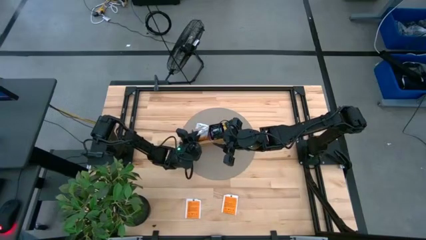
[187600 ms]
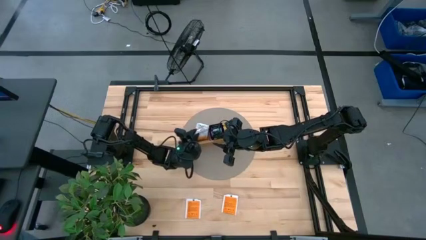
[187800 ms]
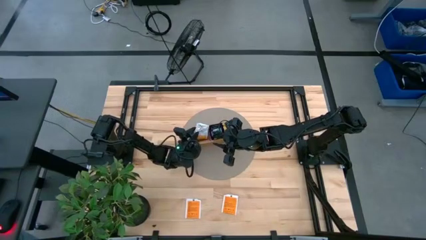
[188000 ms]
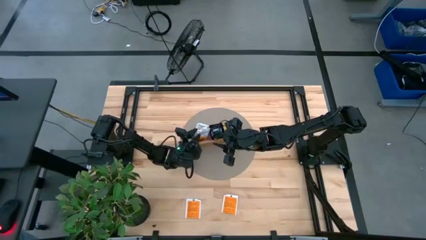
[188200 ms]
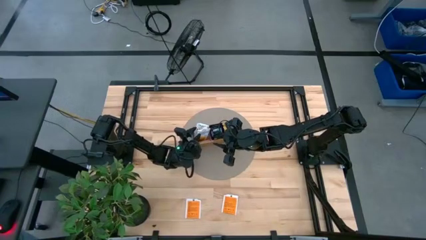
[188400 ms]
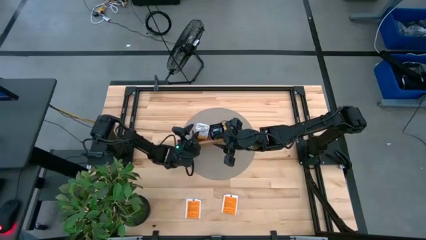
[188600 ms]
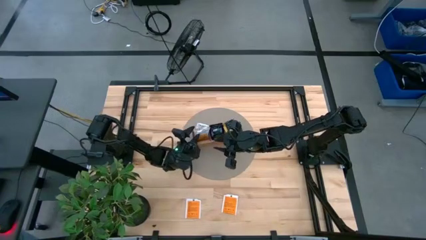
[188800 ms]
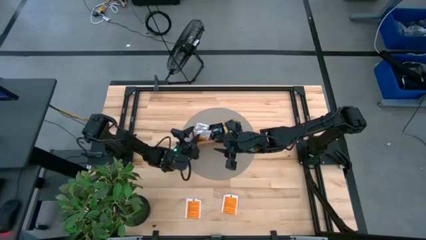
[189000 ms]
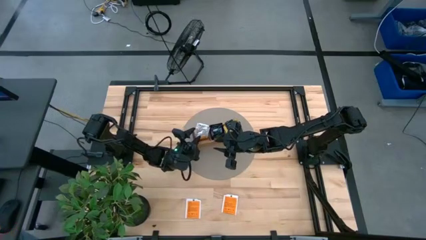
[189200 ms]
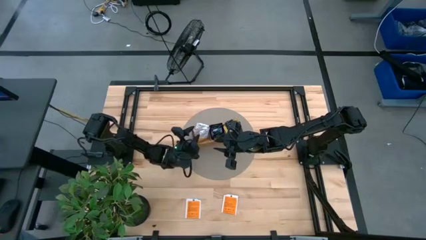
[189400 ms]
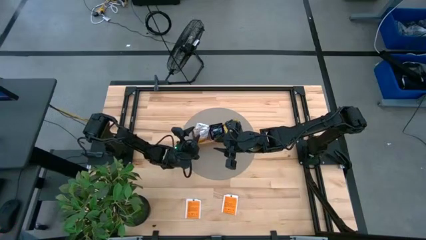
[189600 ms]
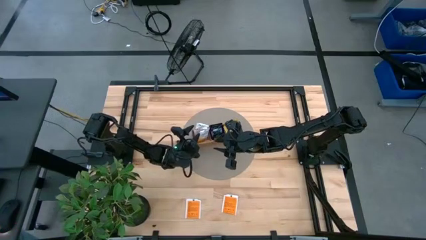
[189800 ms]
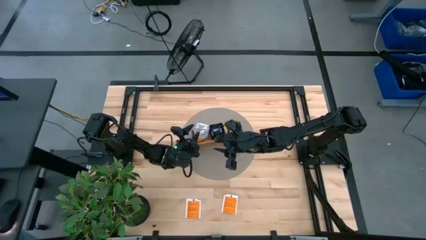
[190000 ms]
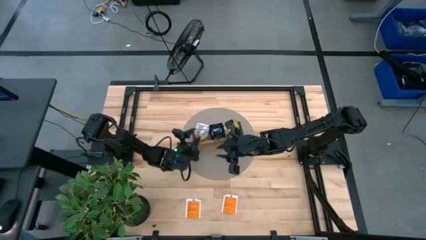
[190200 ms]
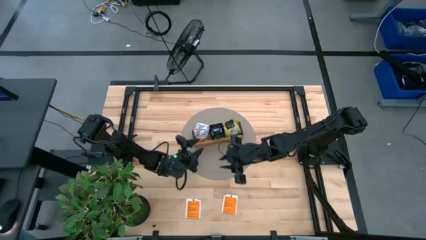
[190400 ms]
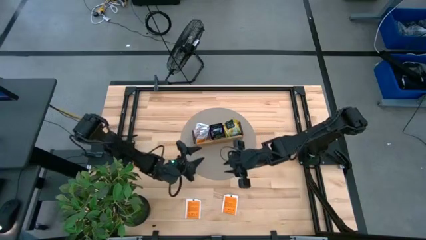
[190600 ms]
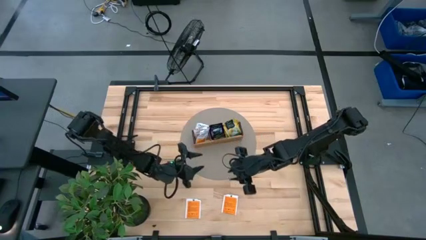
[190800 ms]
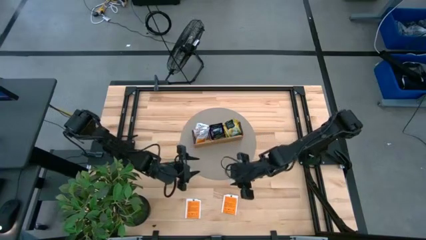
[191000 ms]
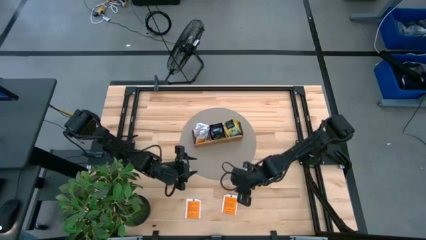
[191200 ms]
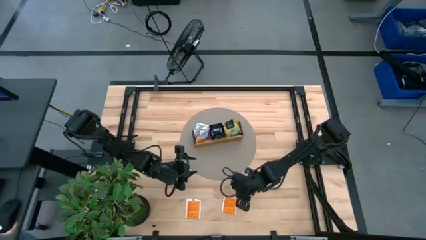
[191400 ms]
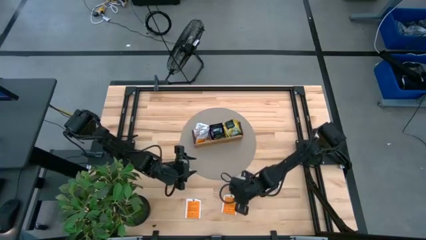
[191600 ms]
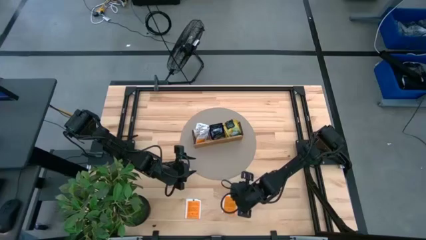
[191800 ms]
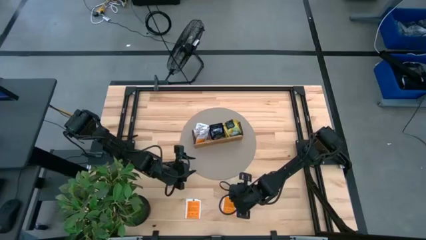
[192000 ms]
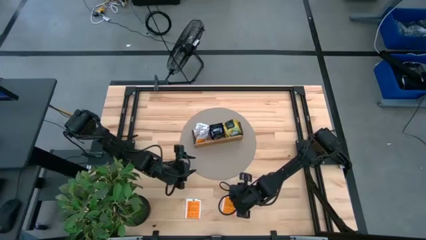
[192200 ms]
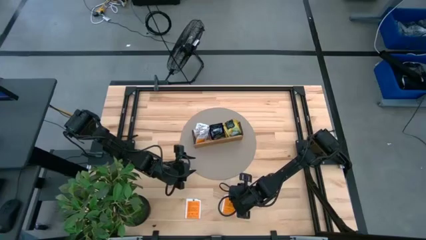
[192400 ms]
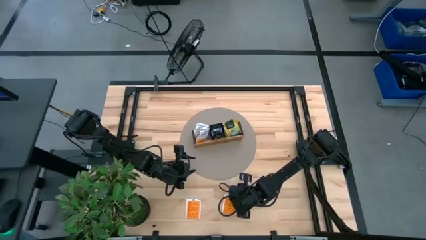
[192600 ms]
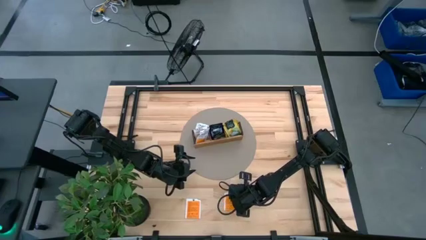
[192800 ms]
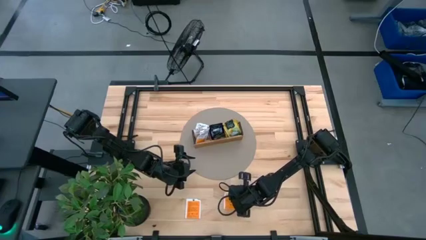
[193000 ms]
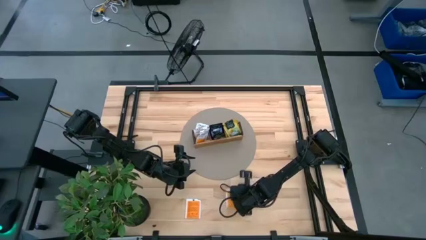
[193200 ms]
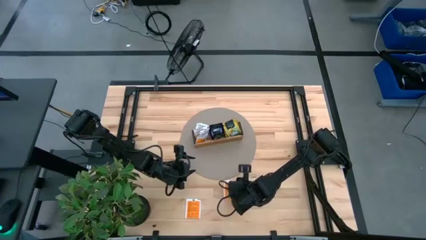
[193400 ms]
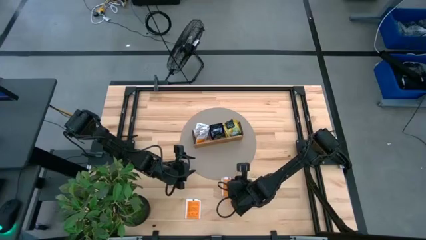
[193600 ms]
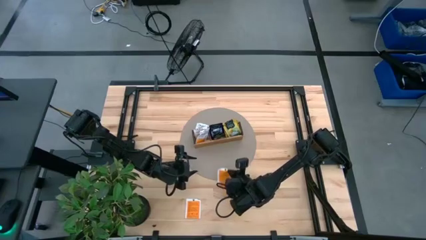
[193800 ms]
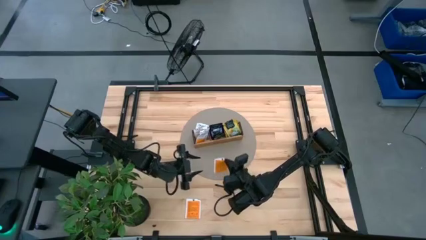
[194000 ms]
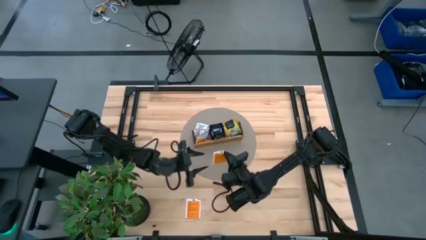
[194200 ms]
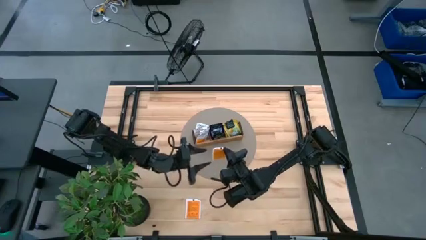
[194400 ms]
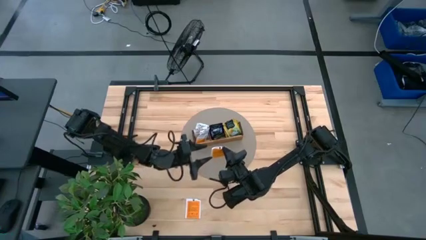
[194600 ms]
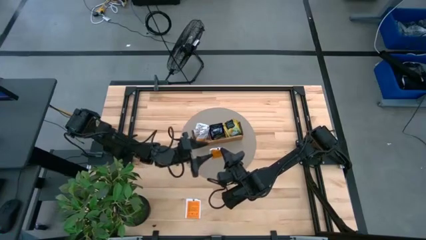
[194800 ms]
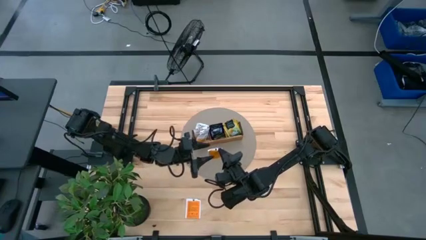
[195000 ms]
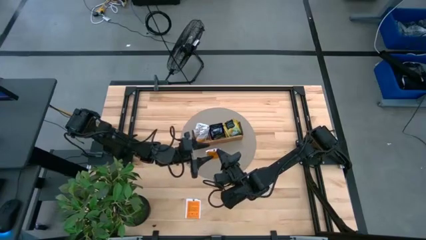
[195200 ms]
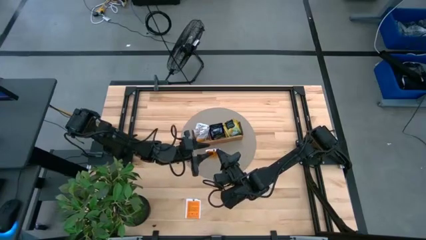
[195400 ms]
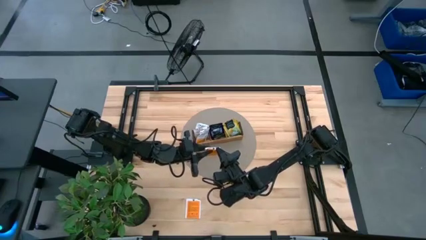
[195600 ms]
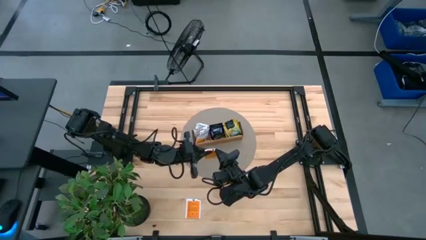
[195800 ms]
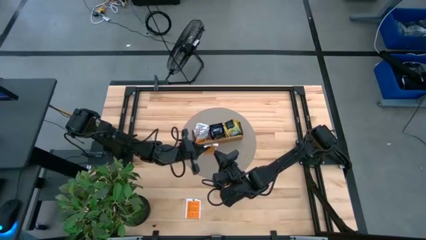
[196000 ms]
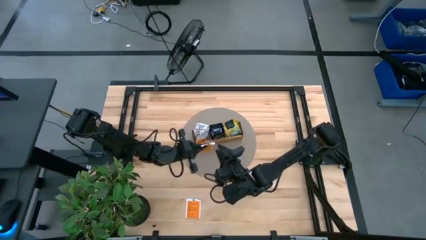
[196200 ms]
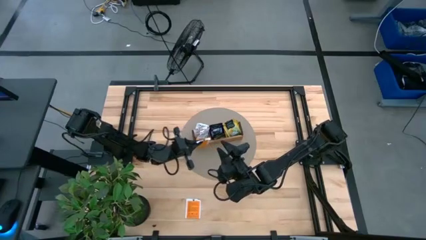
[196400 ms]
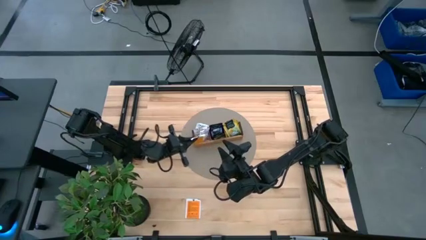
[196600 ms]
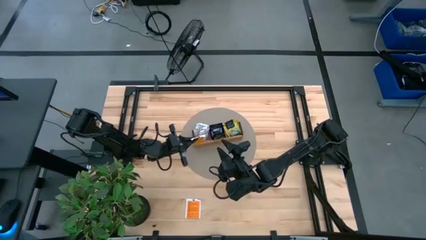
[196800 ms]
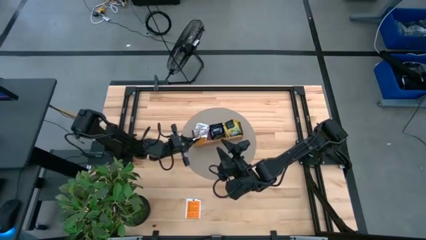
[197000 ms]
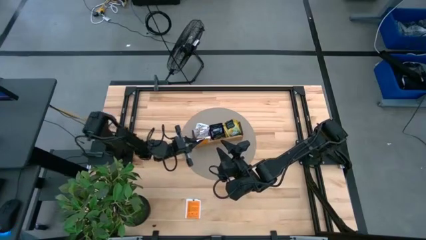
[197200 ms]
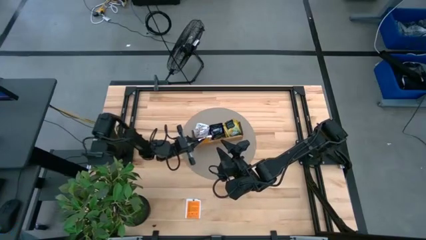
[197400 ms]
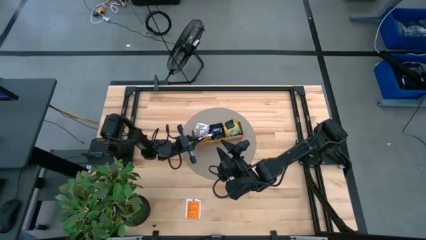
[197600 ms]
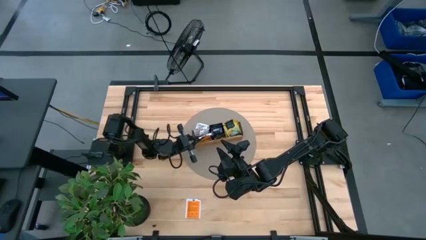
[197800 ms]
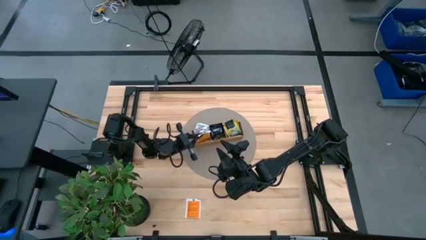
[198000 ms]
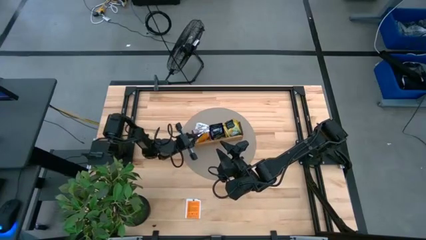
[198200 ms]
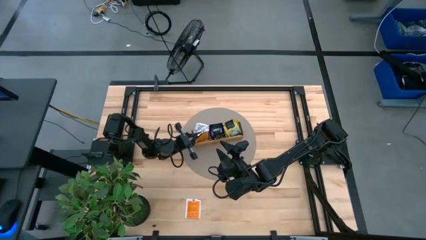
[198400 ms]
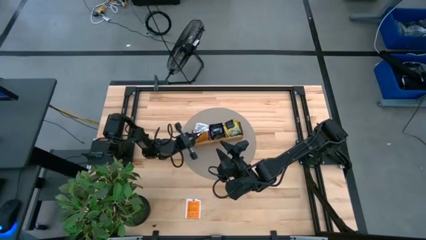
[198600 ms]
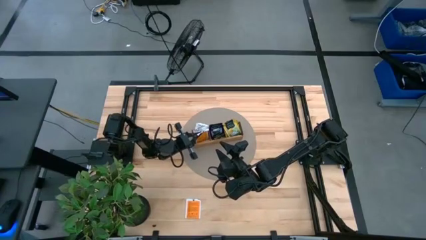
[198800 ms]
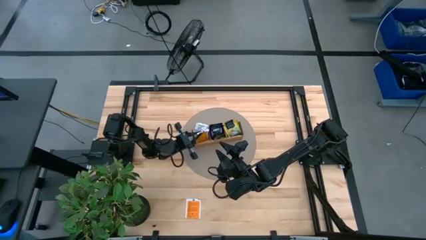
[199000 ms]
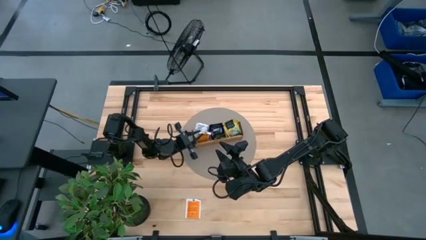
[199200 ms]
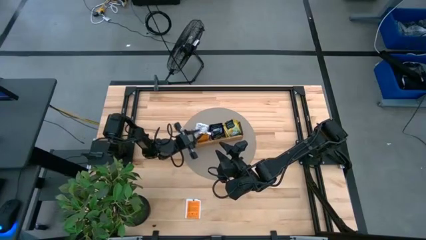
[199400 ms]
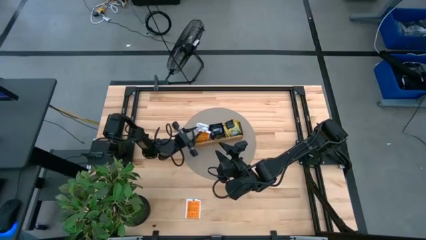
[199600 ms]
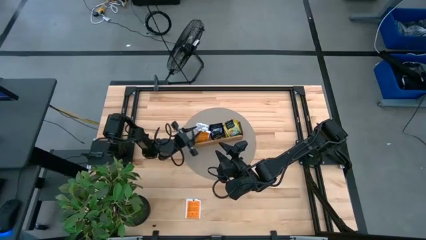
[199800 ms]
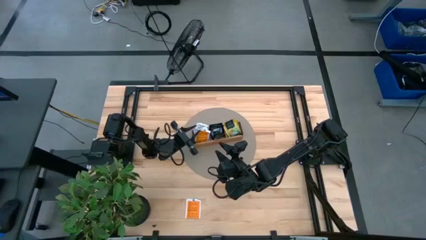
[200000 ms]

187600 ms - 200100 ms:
Task: Pick & Place Tea
Put the white tea bag into the left section of the wooden organizer

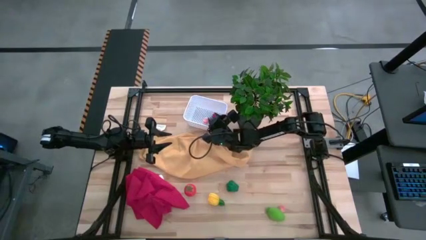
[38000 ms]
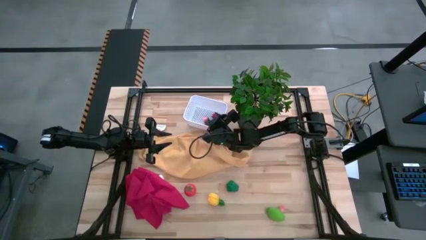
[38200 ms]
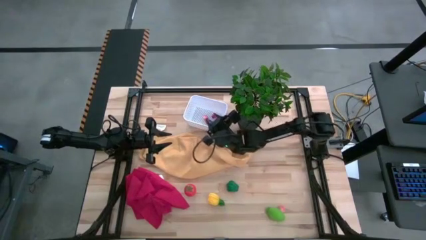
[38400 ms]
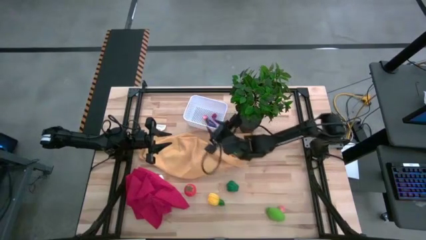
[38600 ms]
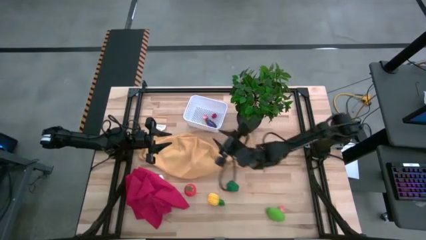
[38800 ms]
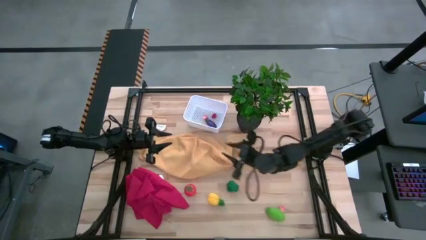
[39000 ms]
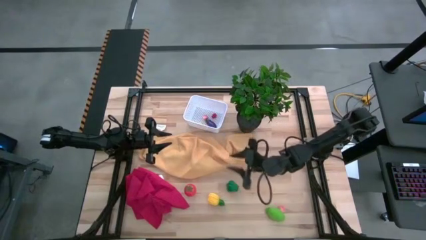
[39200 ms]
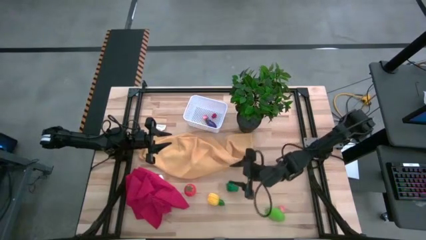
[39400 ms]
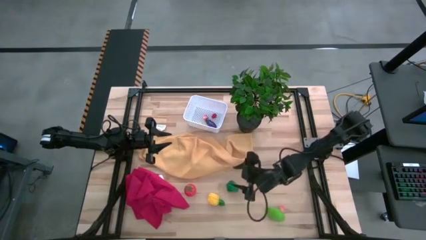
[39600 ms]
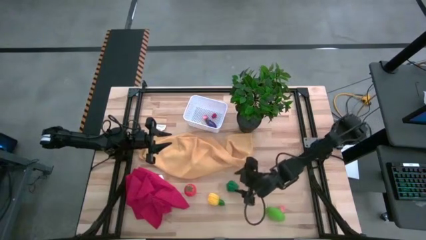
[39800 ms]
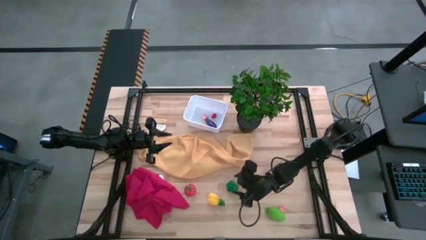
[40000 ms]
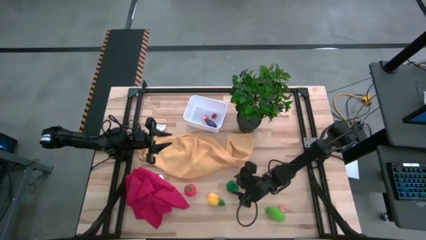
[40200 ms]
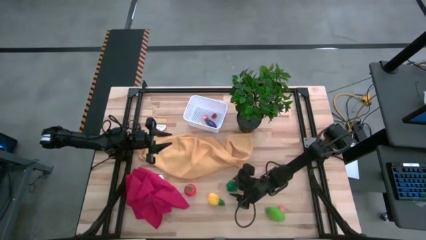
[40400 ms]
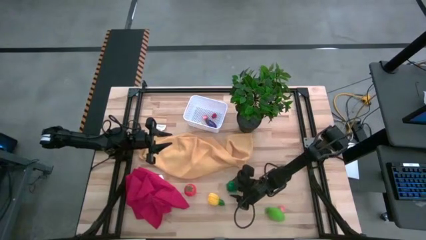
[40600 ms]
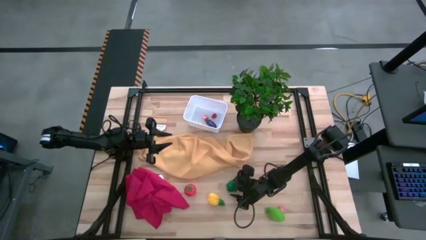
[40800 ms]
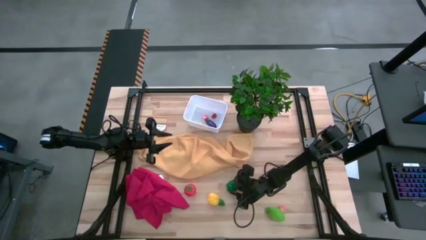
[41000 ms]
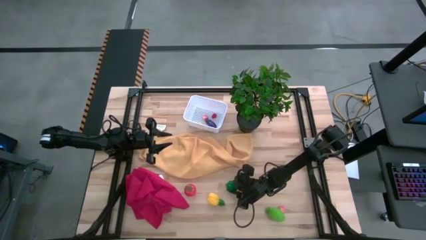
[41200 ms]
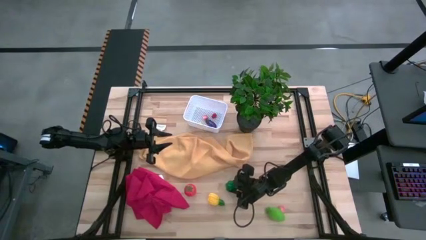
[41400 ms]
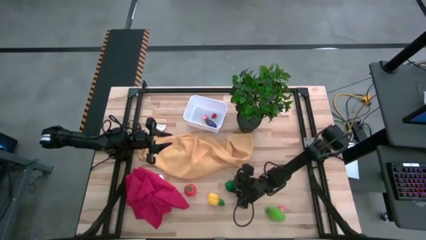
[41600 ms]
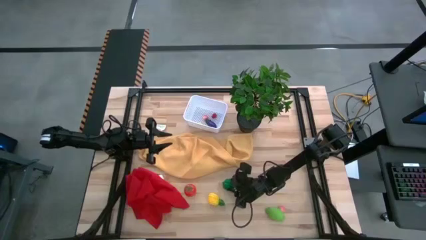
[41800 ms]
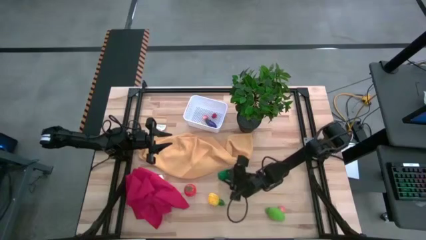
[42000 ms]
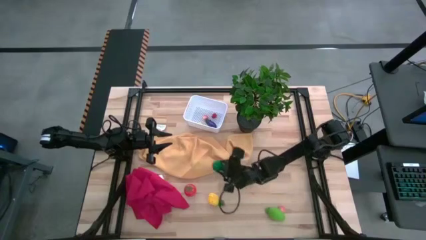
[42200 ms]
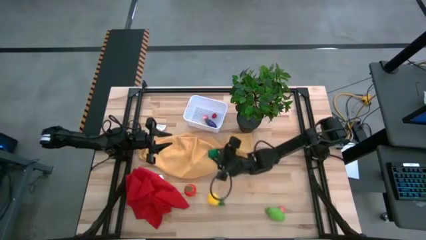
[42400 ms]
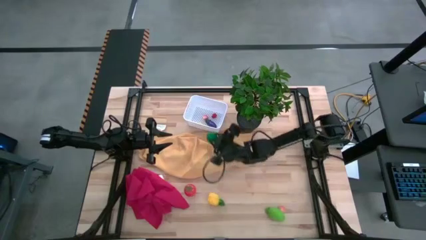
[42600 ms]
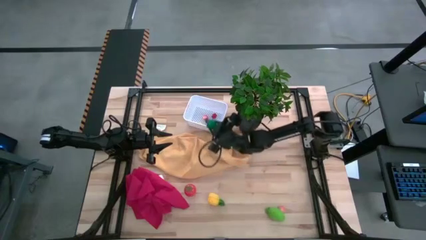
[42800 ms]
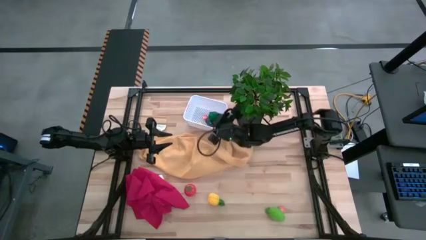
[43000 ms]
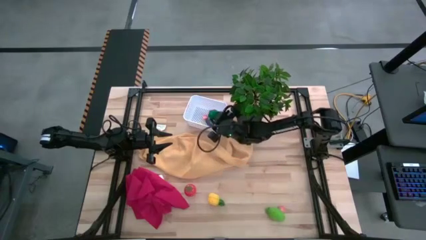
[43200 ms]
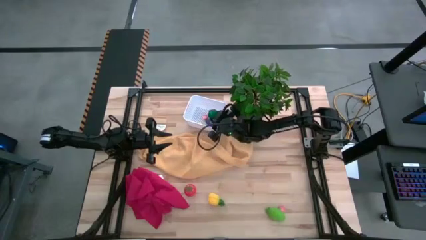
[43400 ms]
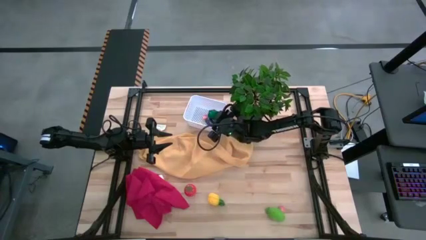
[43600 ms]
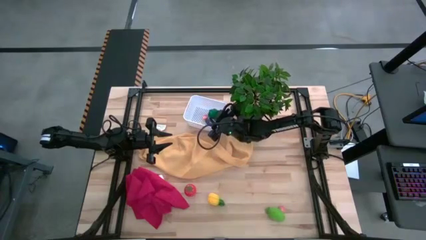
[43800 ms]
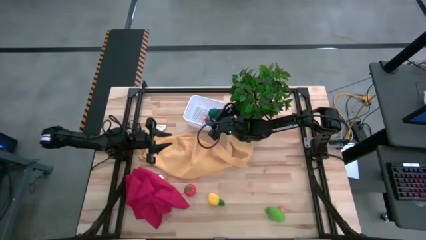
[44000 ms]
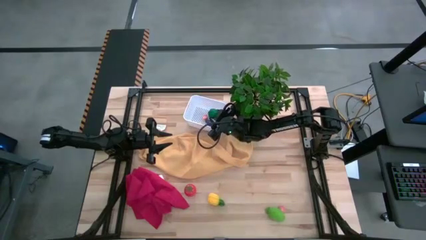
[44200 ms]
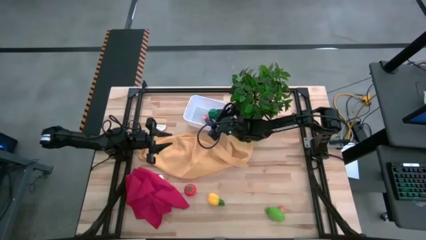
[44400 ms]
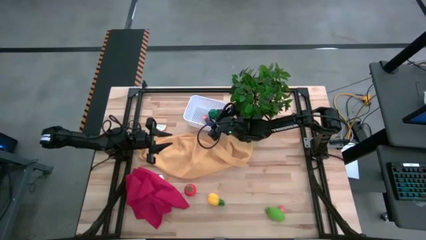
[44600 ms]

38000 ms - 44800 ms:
Task: Pick and placing Produce into tupperware
Put the green bell pepper into the white bin
